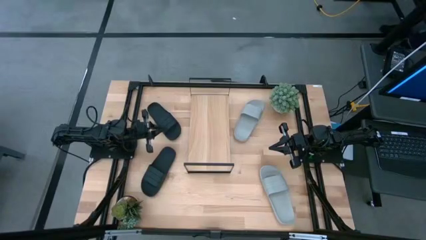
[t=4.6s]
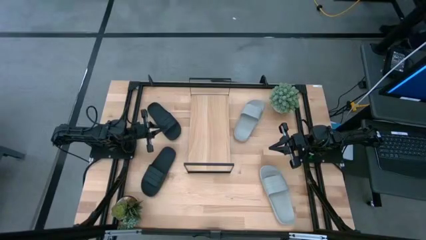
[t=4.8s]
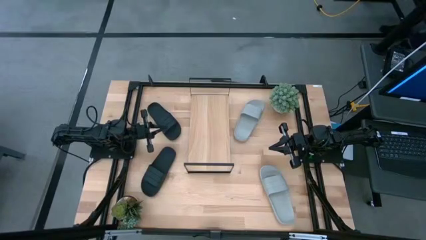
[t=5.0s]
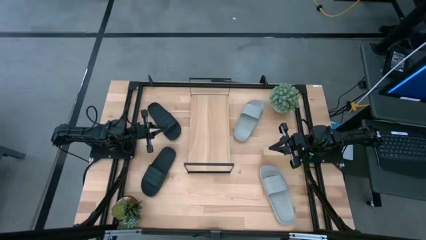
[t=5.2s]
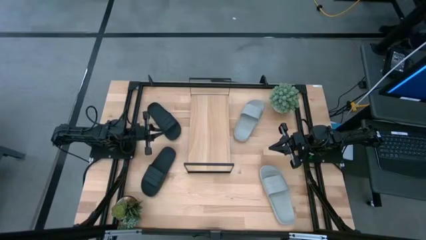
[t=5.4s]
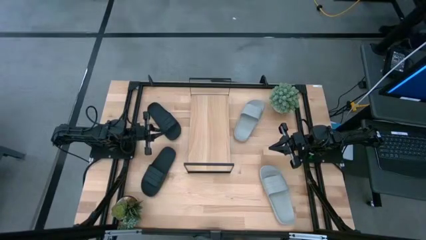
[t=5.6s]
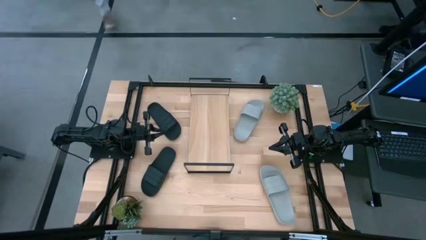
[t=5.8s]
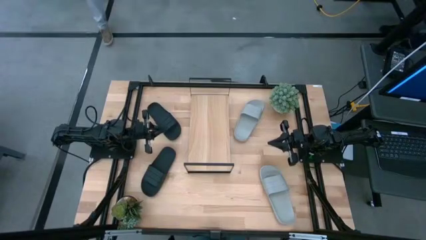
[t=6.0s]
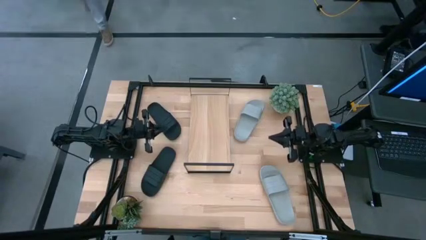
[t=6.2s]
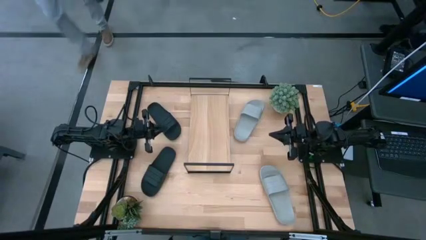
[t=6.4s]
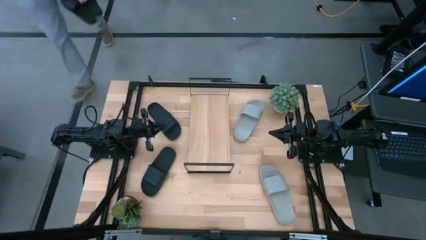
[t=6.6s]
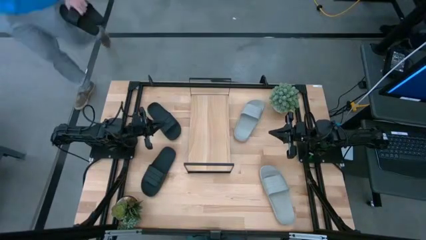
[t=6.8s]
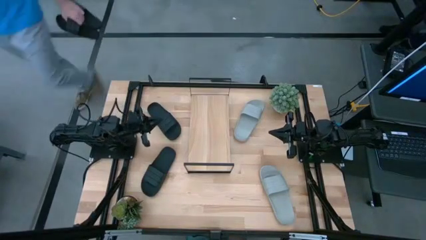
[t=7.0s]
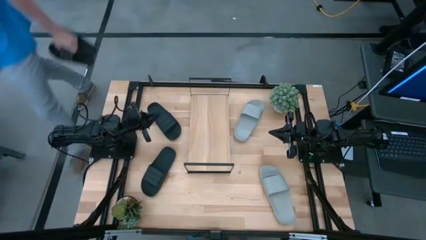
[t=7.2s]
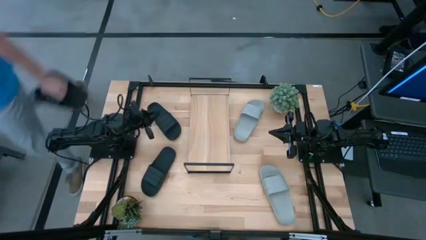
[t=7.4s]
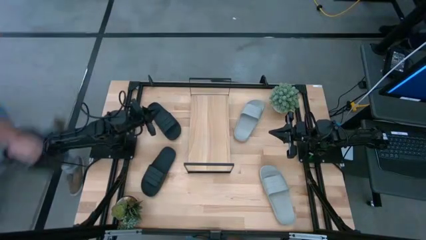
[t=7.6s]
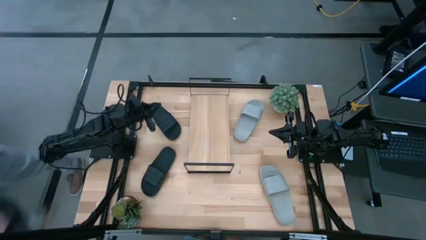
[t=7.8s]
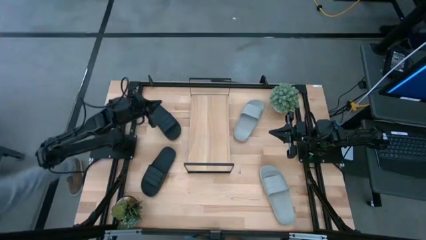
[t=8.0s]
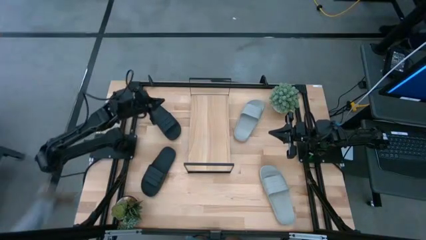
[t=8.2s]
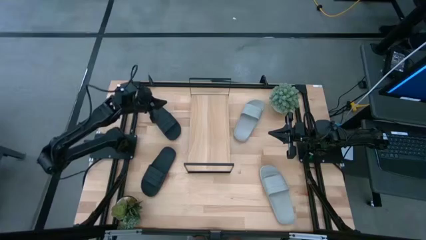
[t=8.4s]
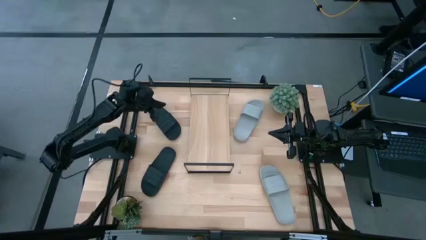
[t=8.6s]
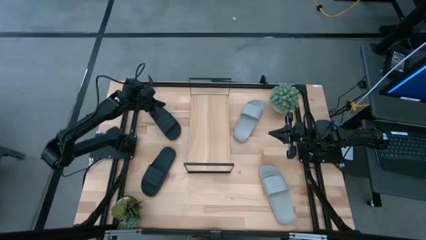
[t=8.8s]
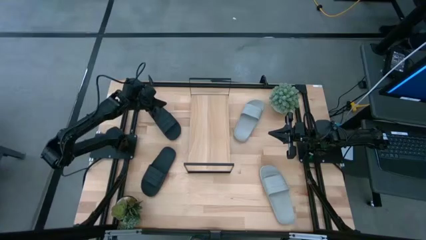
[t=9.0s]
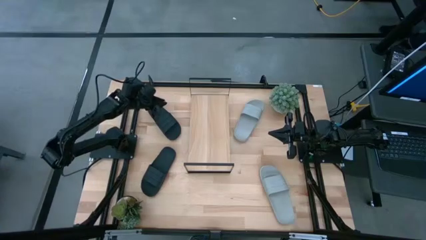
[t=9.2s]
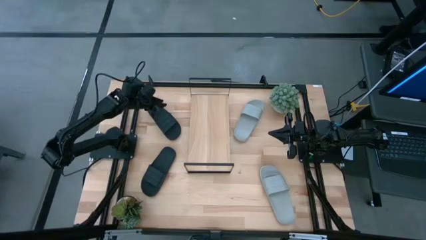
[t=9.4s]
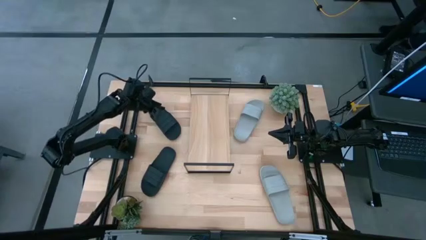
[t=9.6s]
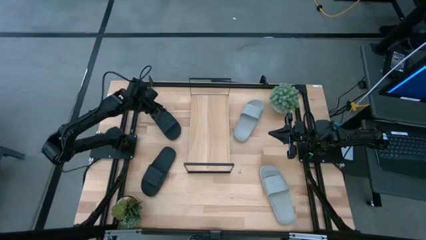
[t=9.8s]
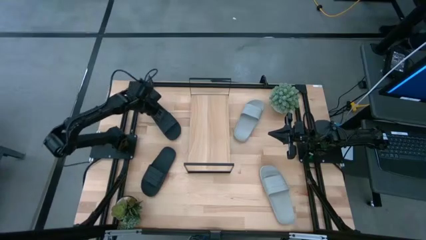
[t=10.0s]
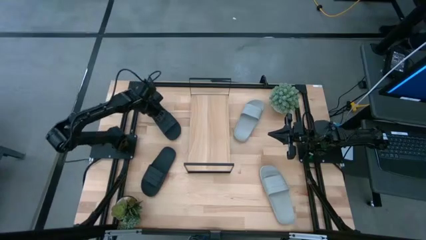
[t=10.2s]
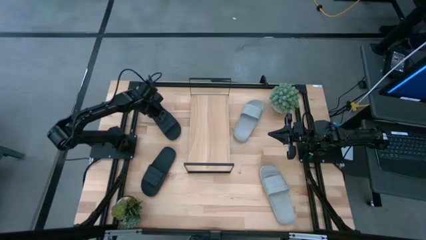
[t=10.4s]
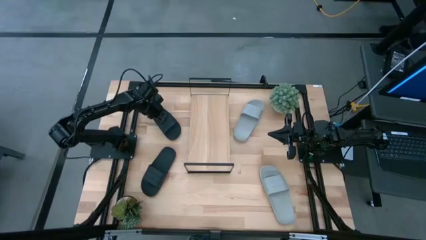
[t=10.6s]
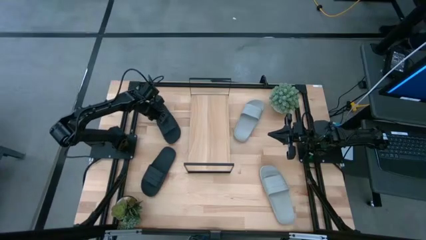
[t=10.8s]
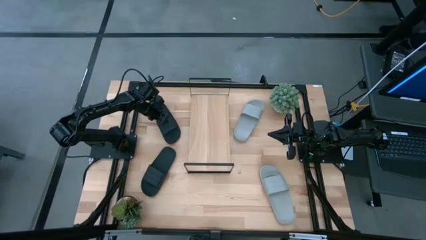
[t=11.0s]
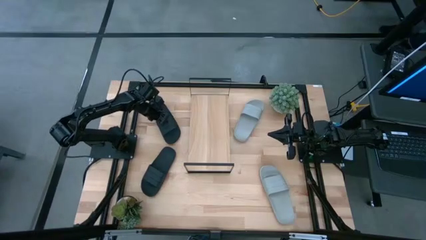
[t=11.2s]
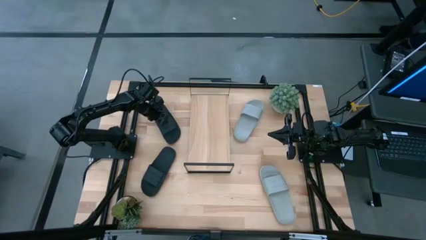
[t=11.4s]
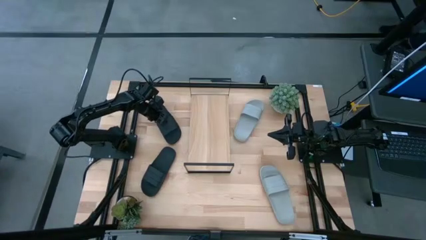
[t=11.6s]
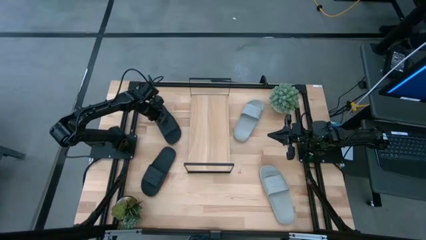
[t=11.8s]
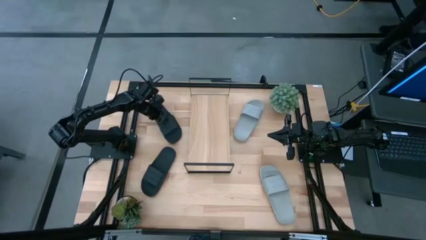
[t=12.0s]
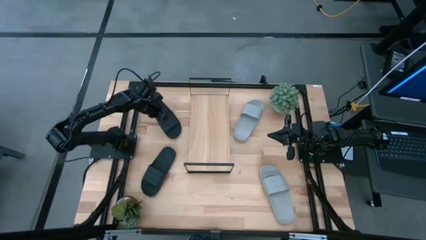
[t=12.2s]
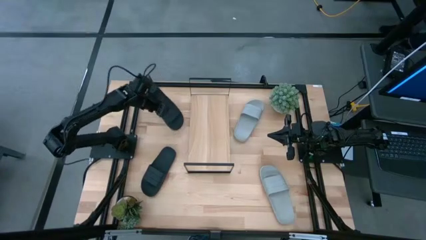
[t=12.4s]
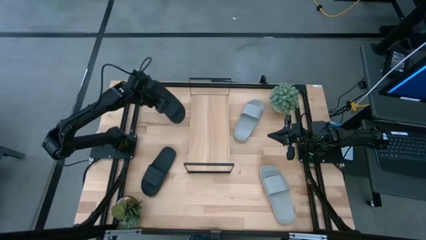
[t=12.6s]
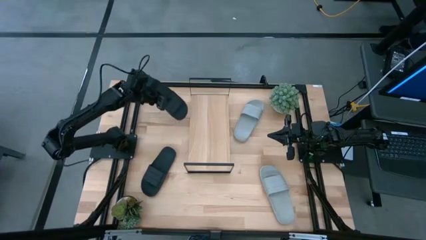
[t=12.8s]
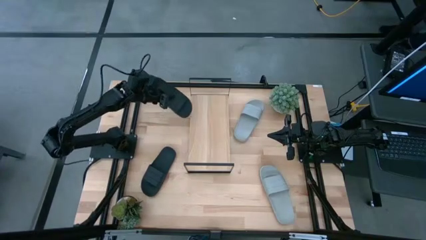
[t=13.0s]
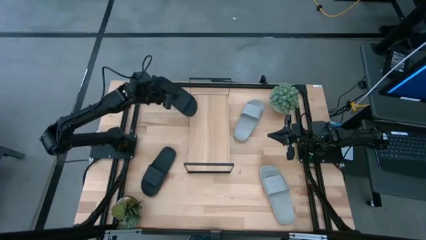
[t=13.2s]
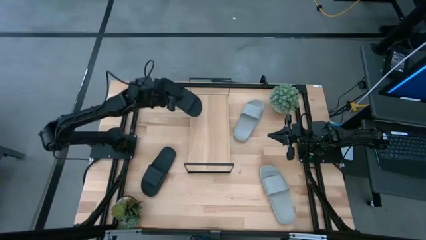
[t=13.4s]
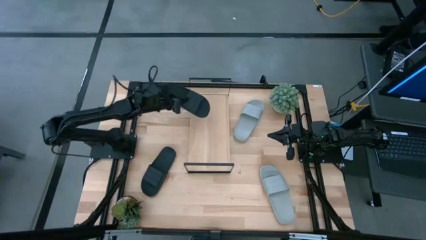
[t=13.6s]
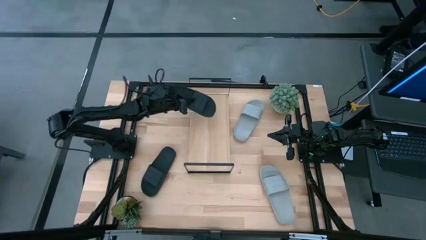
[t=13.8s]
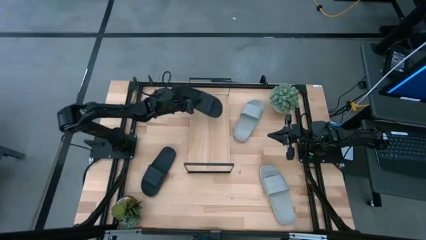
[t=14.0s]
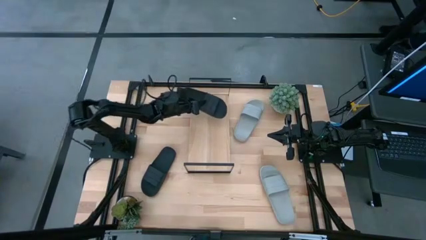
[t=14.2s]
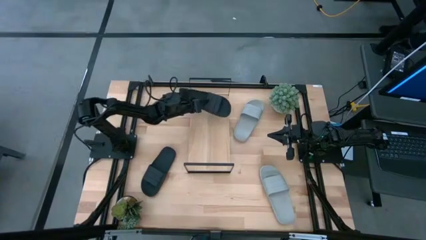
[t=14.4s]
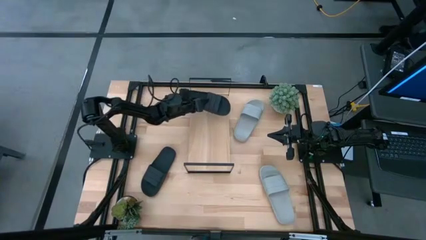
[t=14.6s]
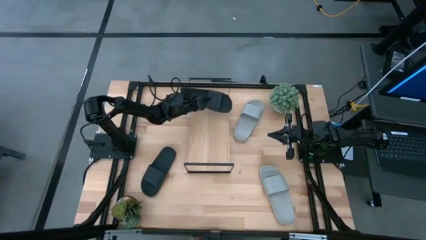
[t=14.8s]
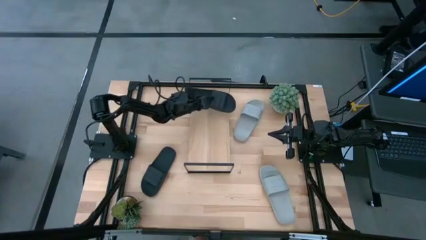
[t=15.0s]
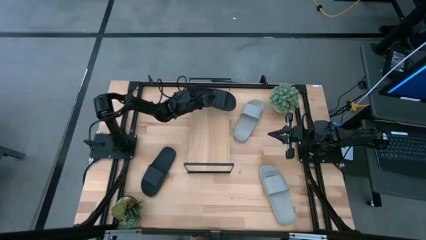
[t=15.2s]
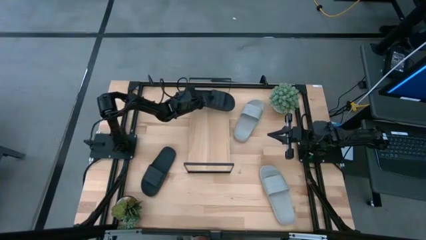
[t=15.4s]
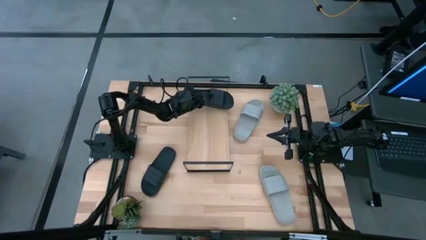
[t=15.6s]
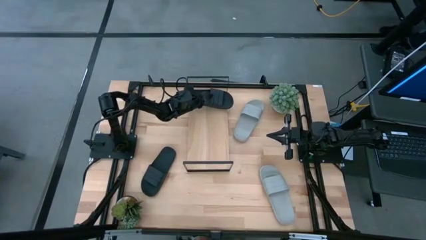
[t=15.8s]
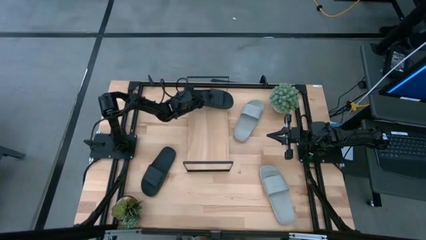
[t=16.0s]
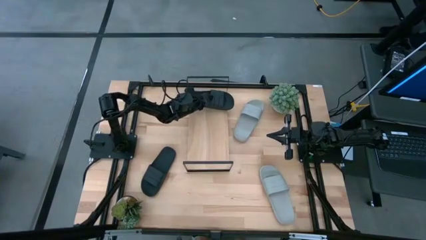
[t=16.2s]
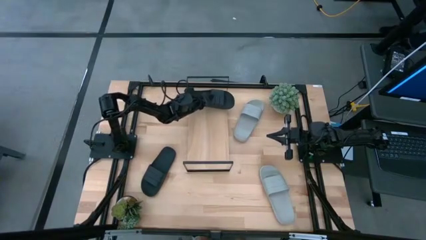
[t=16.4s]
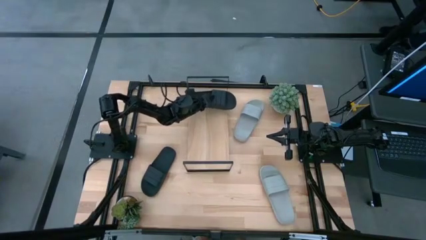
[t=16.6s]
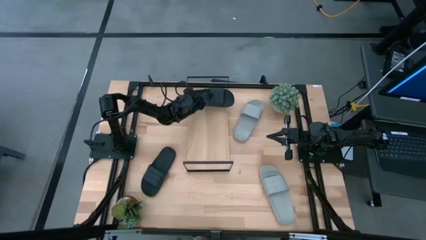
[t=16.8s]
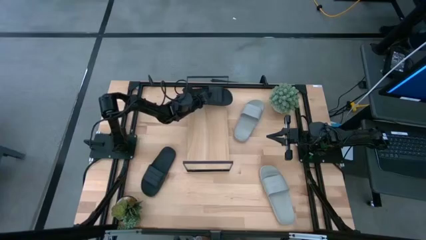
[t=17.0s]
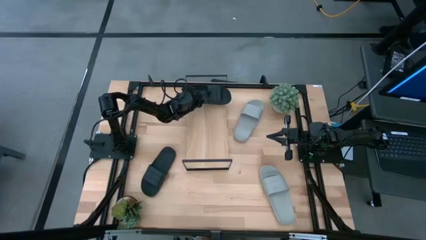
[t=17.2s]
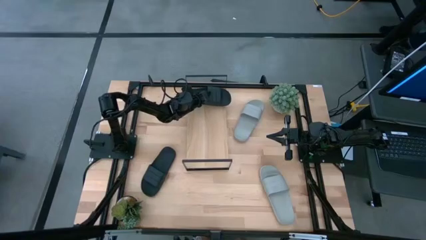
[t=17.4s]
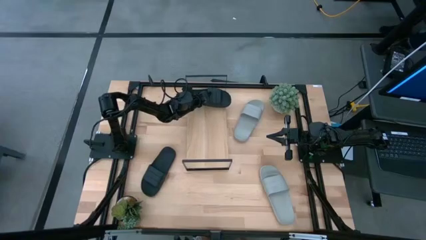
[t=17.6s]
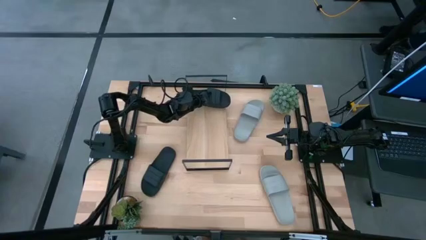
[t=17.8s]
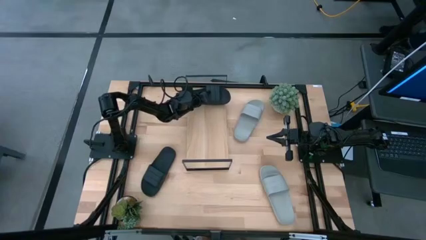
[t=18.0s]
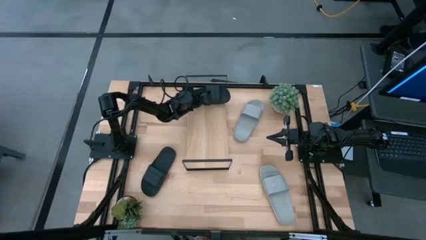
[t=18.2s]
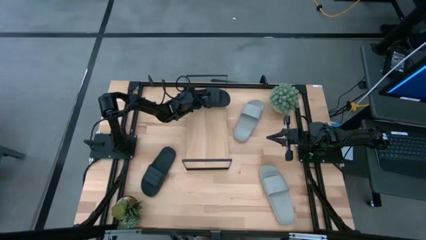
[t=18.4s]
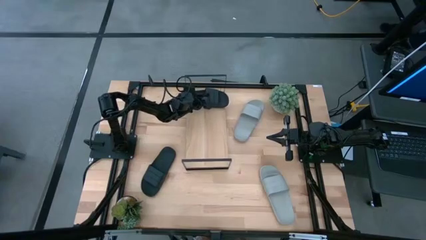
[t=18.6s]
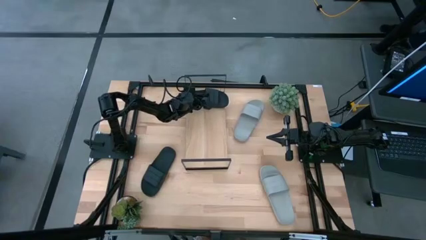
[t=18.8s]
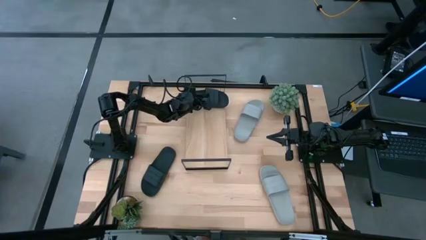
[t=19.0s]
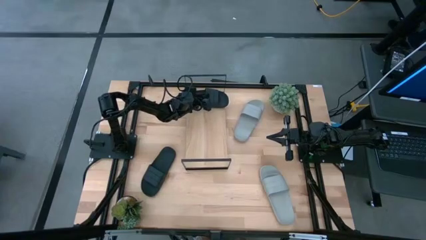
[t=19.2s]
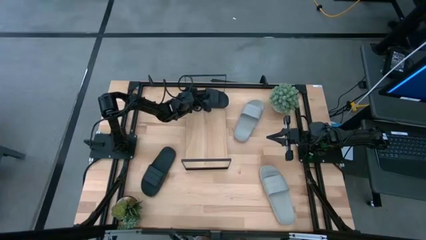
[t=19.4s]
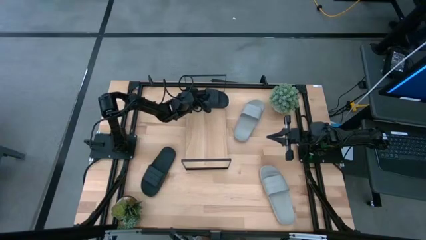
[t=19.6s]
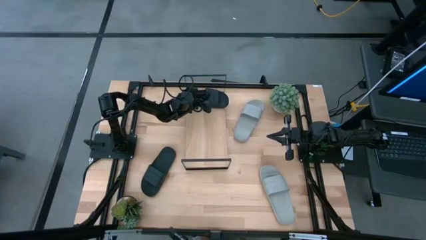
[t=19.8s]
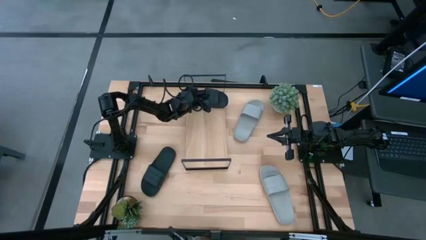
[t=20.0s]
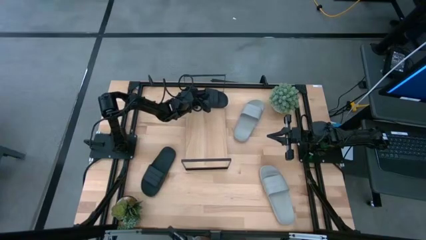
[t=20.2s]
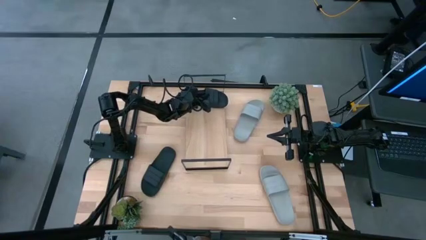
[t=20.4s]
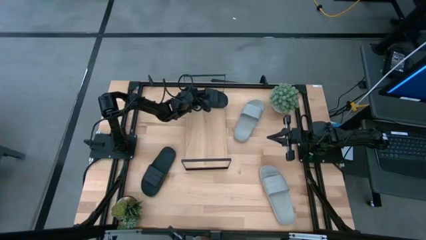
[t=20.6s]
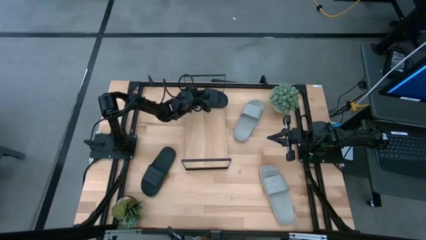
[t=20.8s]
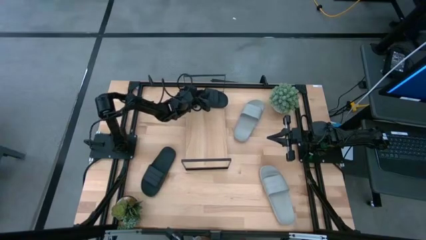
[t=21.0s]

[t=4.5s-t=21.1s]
Task: Pick and place slides into the shelf
Put the top black slides on the shelf
